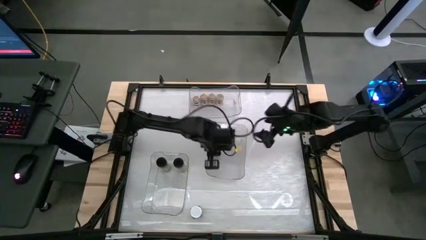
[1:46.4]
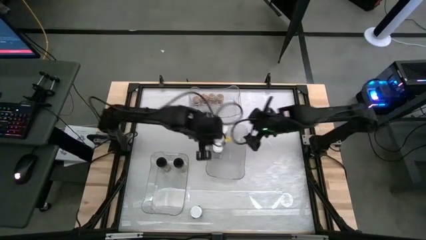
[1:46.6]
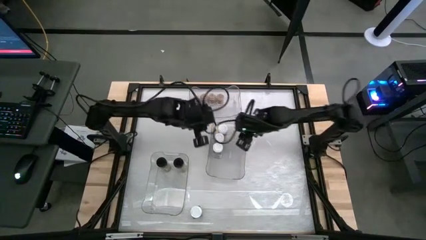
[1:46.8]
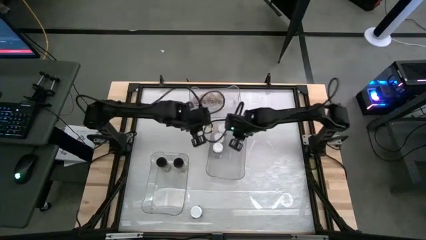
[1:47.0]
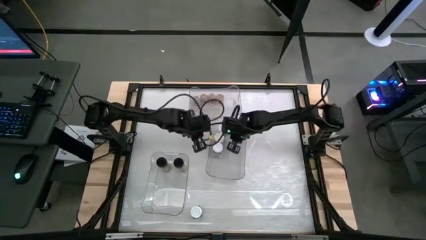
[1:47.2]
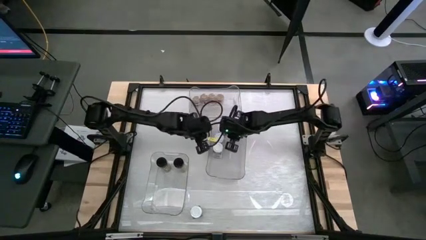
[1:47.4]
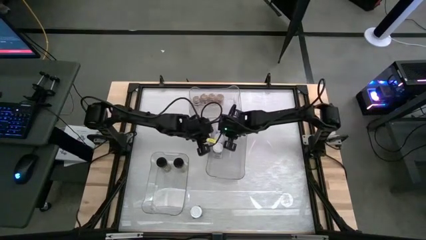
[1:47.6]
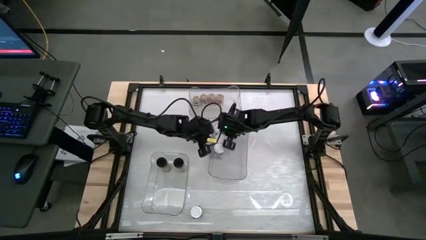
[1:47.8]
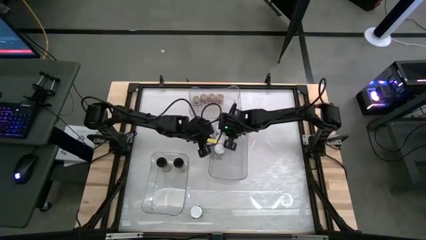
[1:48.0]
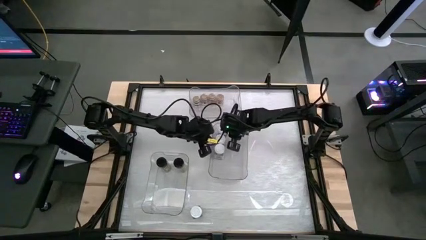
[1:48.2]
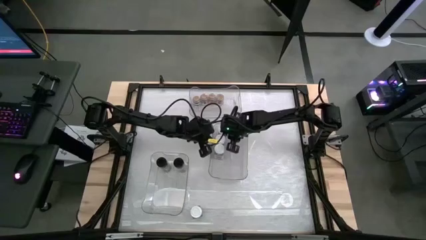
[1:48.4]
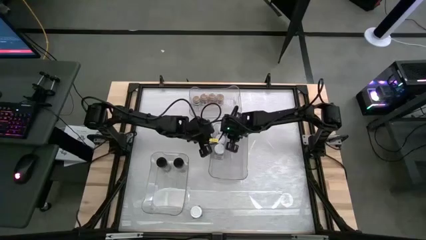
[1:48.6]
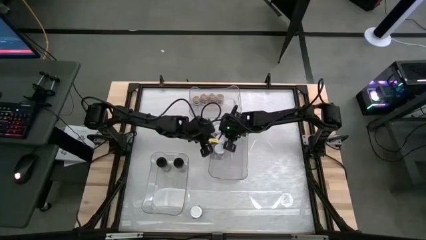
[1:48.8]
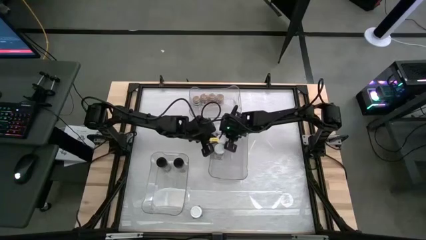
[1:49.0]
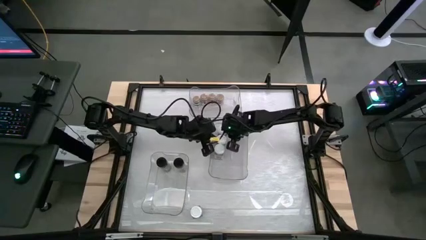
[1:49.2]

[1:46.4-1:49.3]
Task: Sort spices by type
Adjust the white seasoning bottle in the bottom right transparent bin

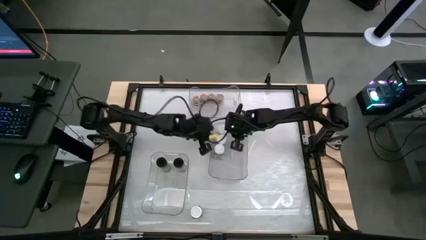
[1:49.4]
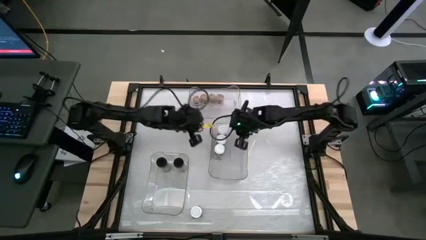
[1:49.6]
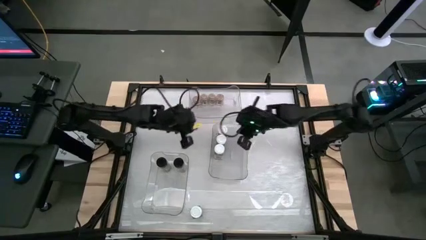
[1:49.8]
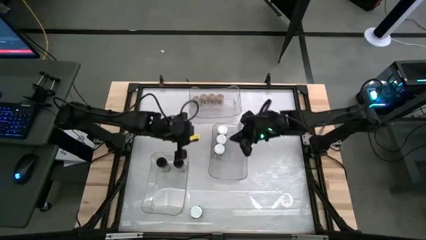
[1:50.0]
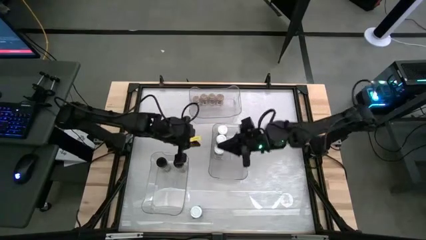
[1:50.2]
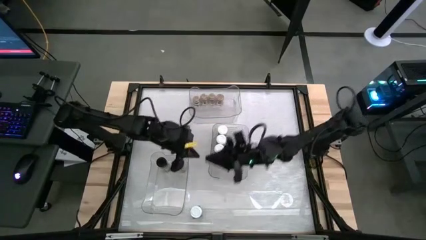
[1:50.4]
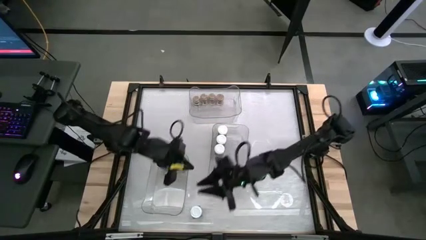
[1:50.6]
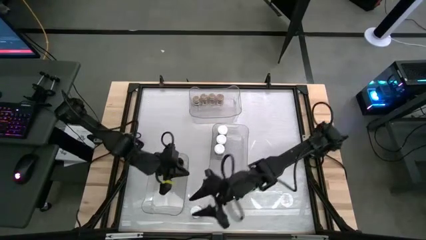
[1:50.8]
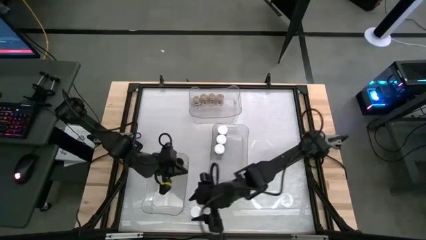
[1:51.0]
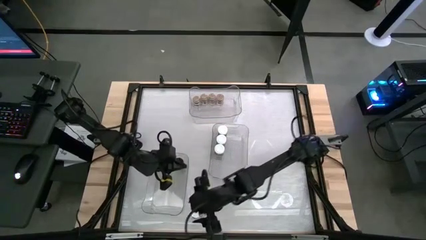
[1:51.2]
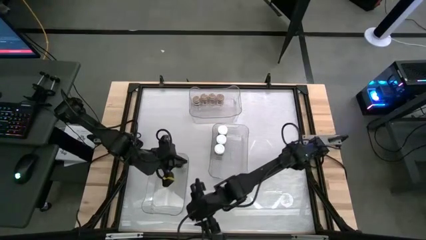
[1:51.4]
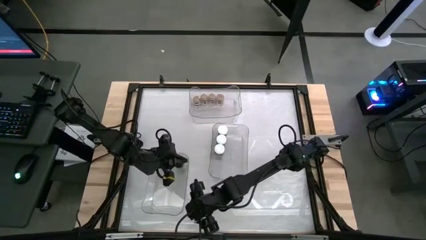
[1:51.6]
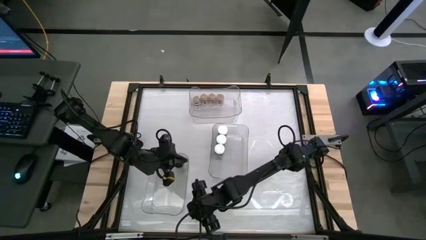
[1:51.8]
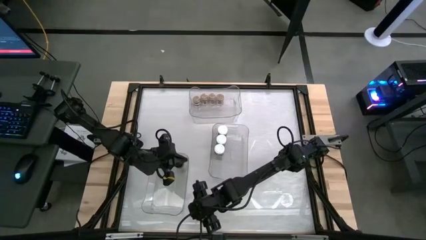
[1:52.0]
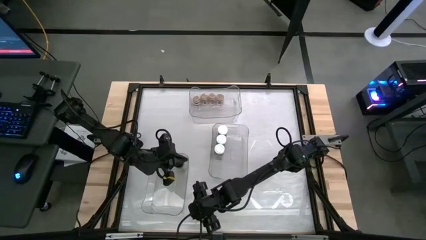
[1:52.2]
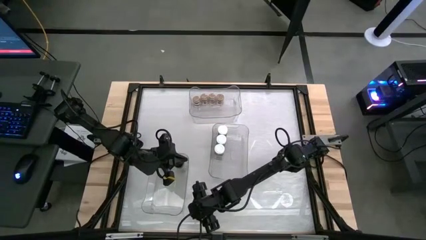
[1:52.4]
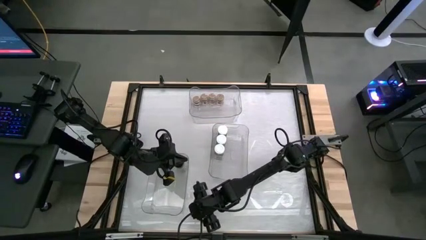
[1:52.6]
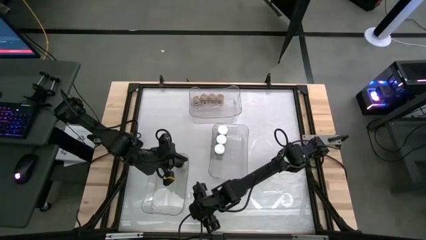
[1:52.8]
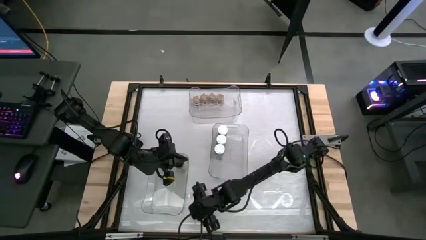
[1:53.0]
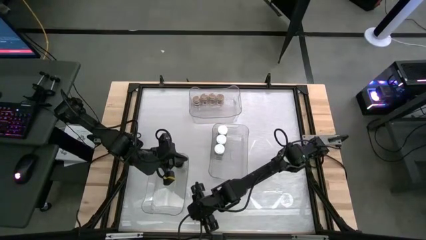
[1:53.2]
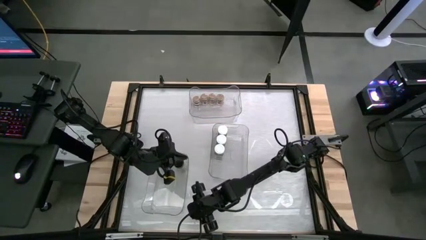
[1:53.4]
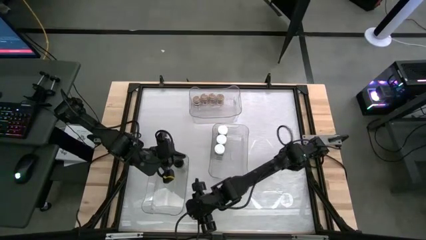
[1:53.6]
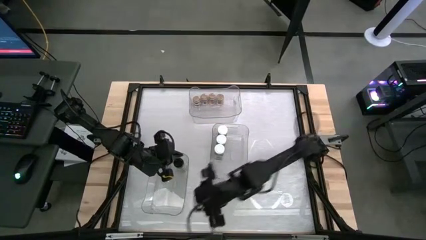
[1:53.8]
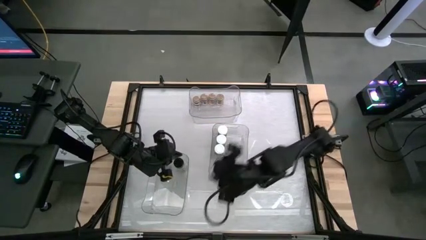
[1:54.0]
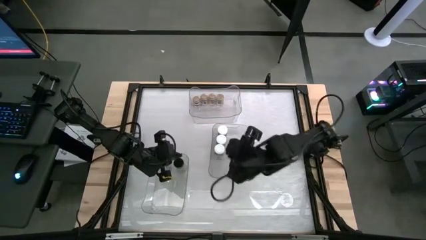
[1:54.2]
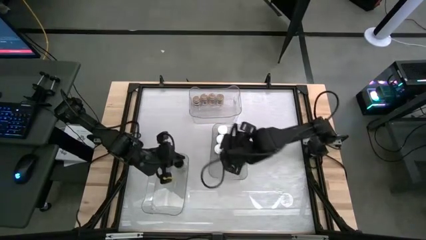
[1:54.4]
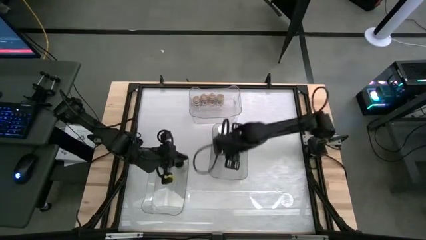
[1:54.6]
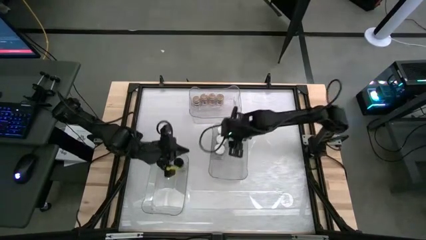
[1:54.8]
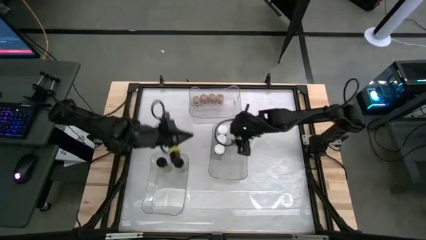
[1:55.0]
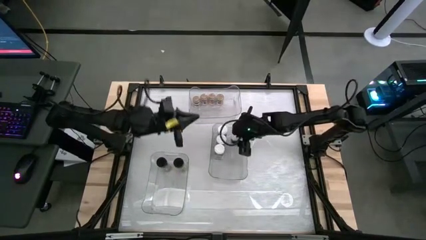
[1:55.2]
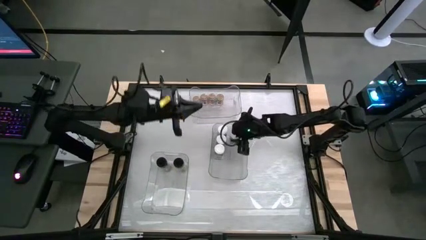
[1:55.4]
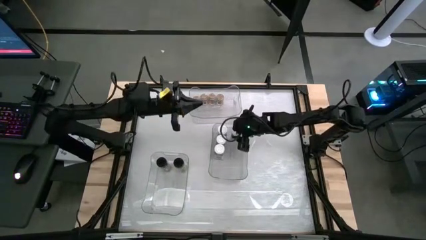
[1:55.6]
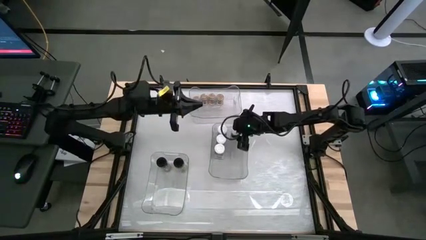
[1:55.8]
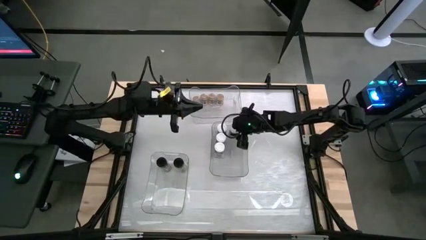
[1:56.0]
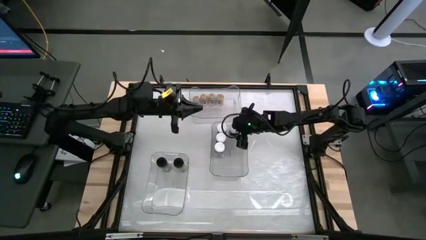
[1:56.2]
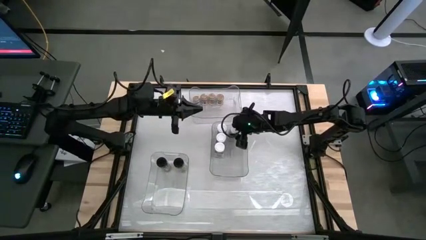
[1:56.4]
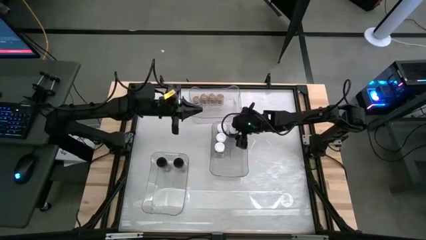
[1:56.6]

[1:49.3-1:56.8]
Put the white seasoning bottle into the bottom right transparent bin

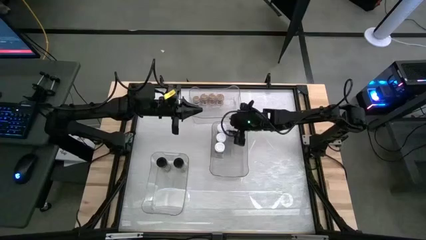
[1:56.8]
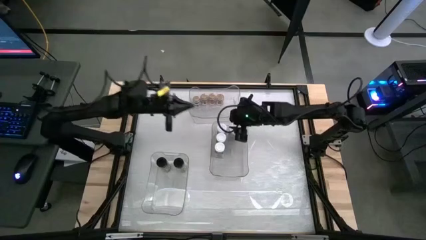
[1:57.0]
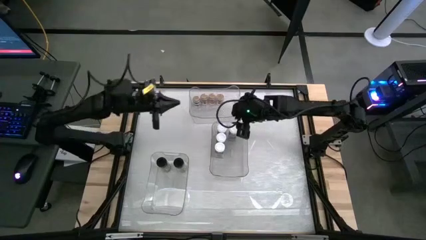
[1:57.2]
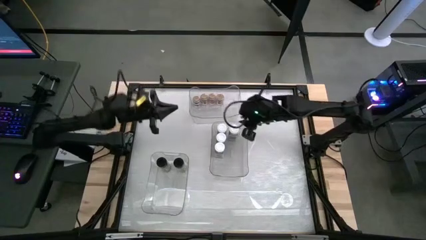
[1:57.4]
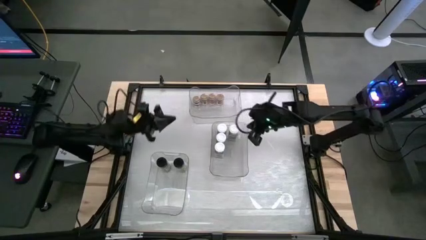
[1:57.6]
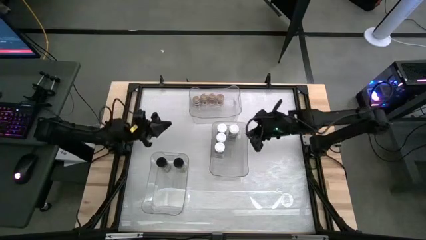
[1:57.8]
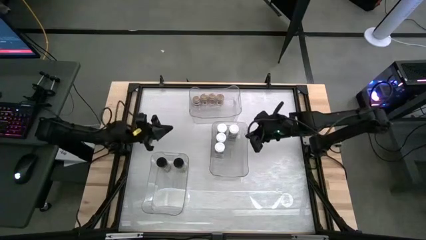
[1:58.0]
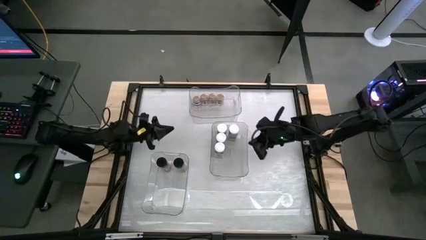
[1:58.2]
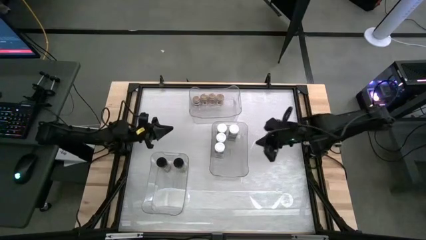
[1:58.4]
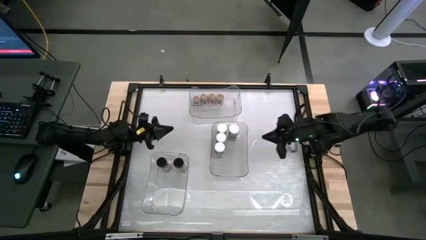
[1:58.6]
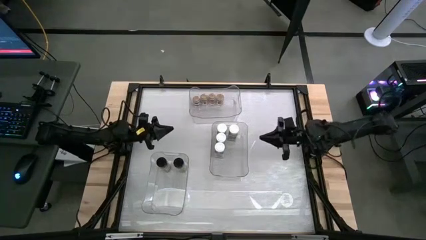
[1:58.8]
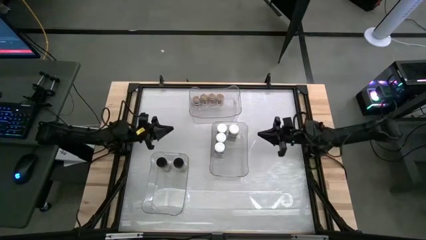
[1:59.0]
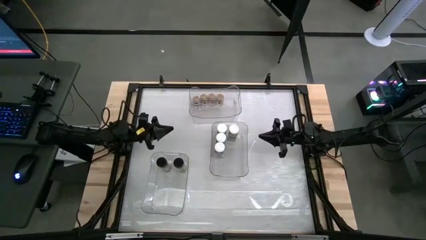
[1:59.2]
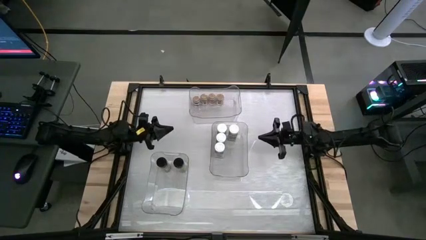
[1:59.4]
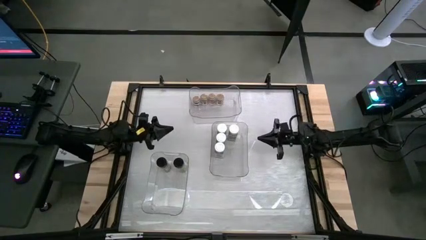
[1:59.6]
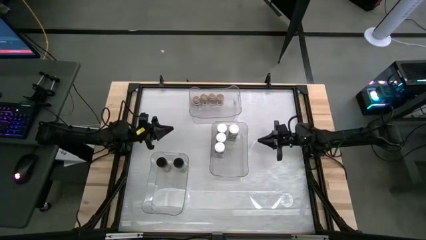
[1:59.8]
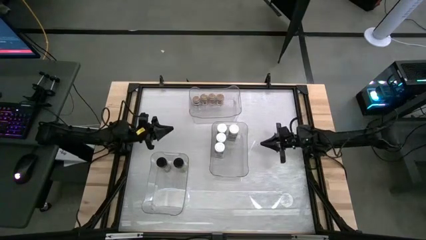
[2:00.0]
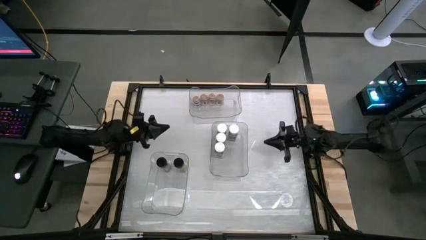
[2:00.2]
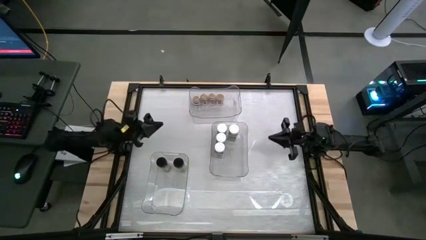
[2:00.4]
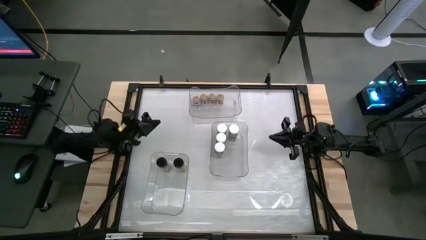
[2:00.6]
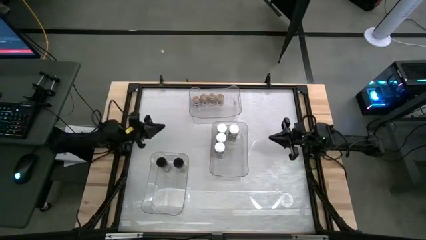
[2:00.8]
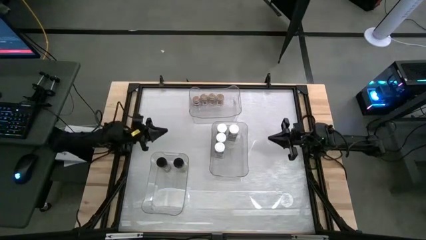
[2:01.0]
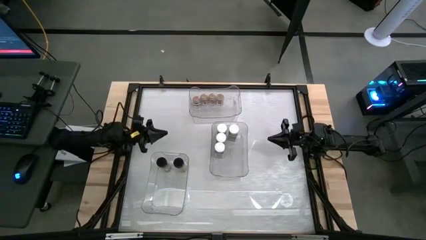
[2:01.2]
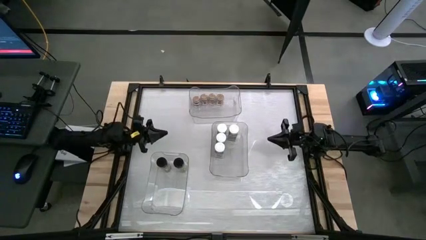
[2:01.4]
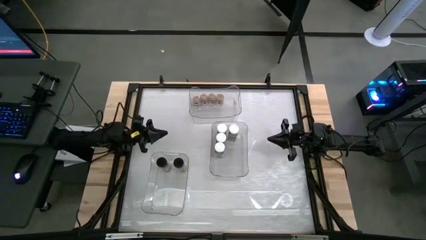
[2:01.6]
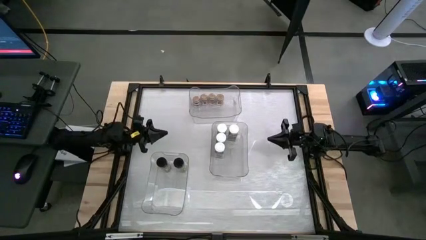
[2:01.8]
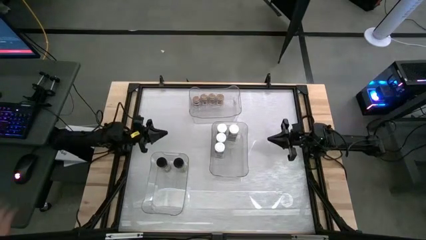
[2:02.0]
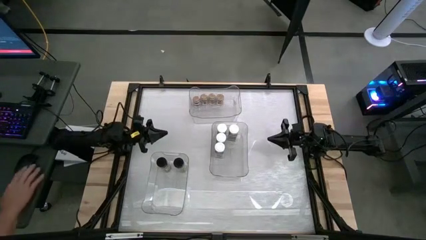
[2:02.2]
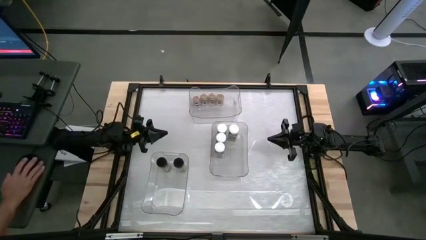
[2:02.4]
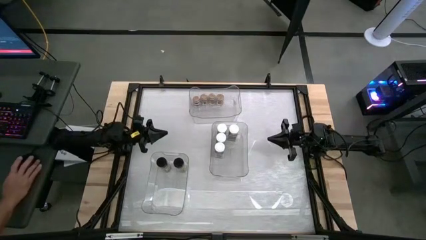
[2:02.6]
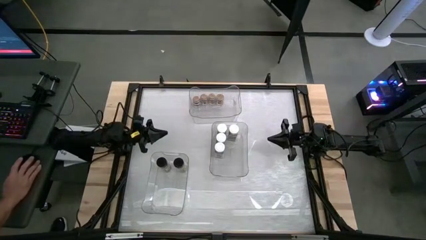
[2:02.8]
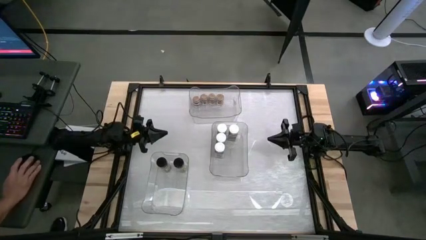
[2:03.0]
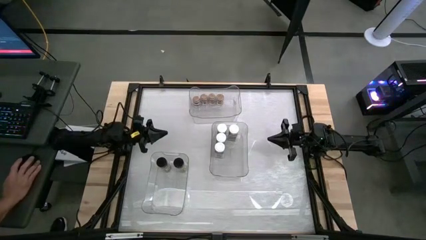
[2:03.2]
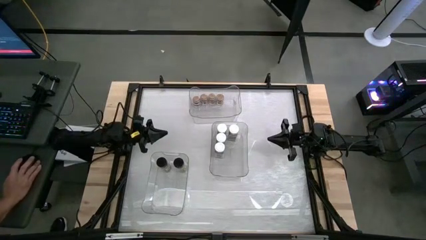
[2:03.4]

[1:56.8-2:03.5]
Return to Home Position
